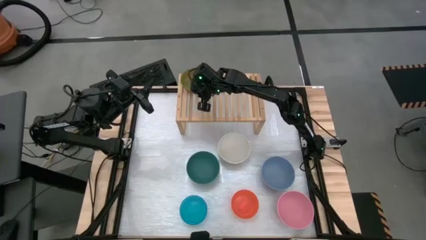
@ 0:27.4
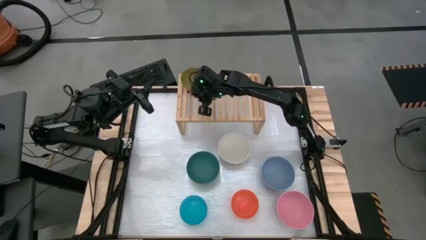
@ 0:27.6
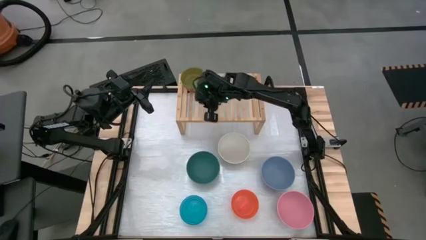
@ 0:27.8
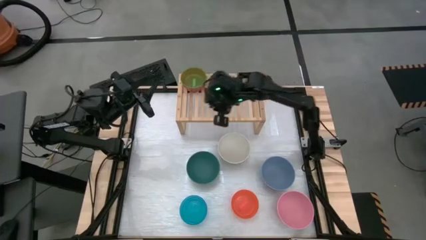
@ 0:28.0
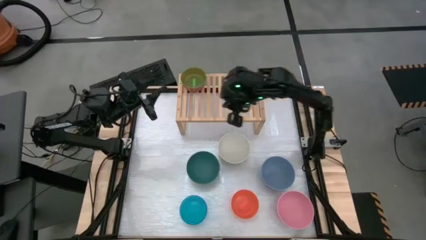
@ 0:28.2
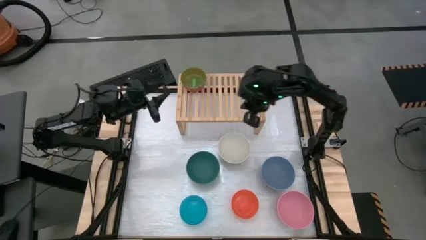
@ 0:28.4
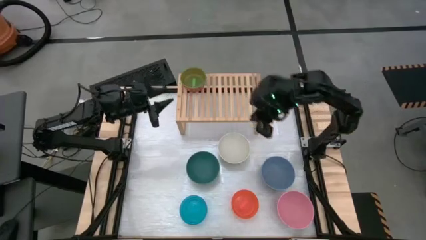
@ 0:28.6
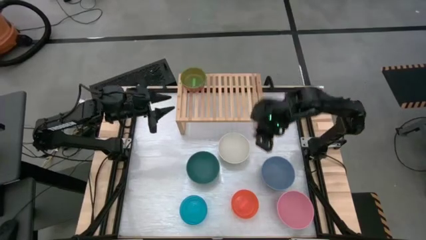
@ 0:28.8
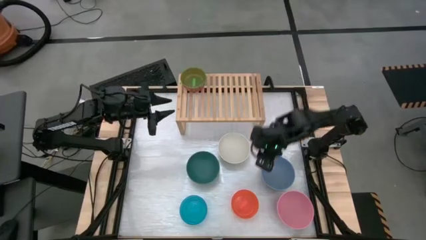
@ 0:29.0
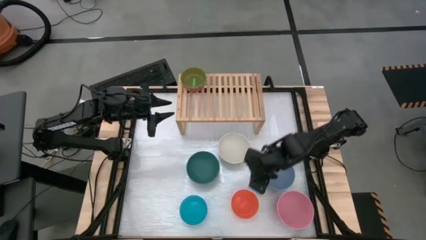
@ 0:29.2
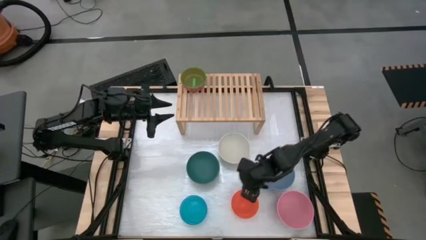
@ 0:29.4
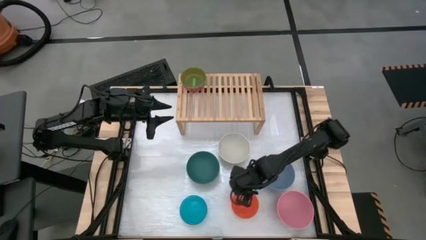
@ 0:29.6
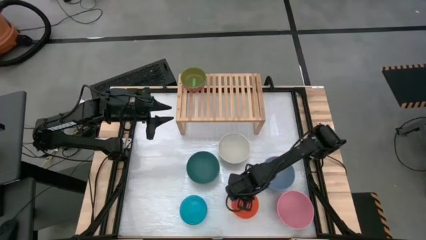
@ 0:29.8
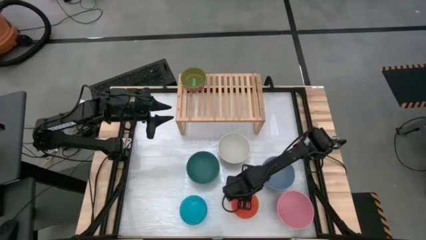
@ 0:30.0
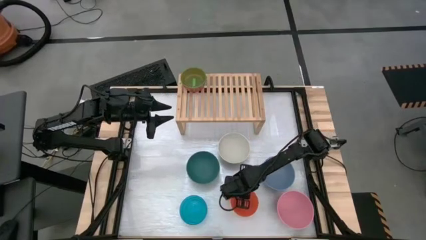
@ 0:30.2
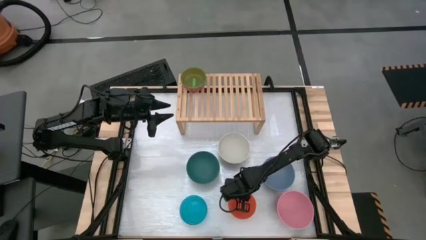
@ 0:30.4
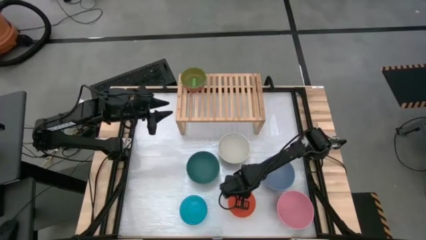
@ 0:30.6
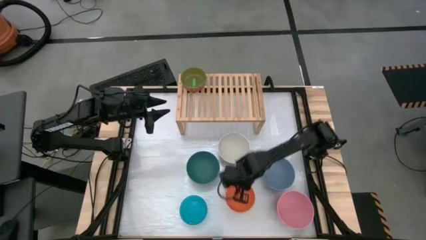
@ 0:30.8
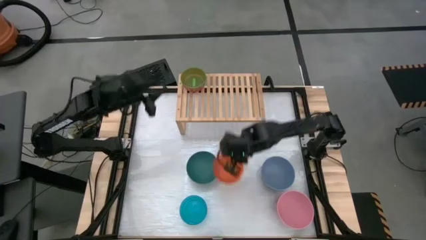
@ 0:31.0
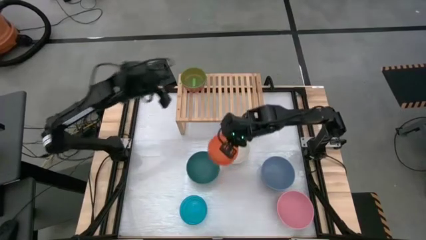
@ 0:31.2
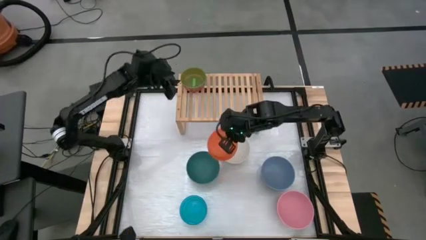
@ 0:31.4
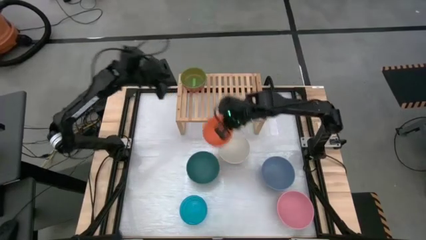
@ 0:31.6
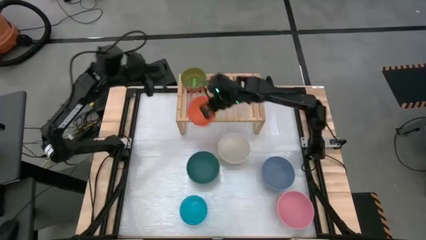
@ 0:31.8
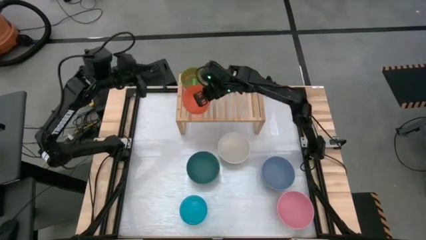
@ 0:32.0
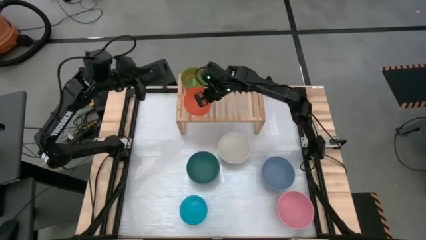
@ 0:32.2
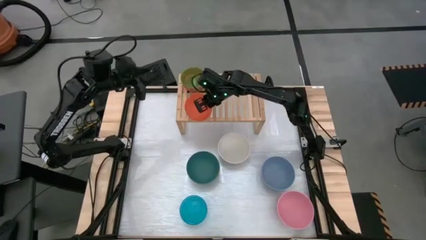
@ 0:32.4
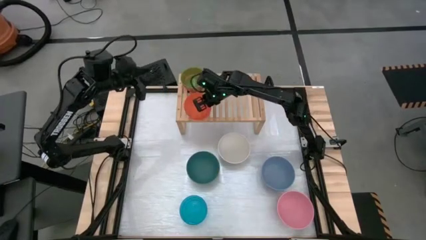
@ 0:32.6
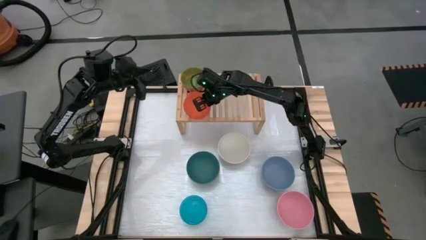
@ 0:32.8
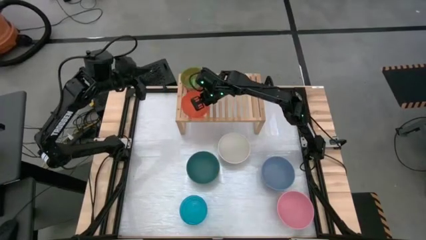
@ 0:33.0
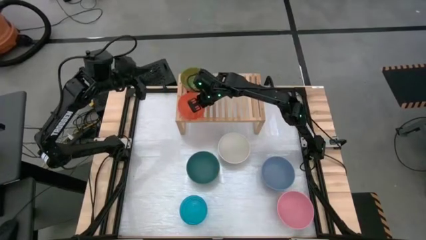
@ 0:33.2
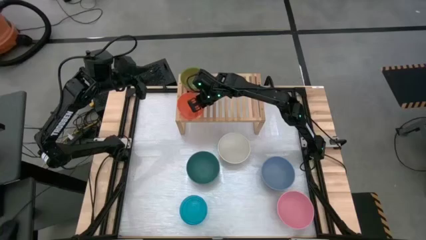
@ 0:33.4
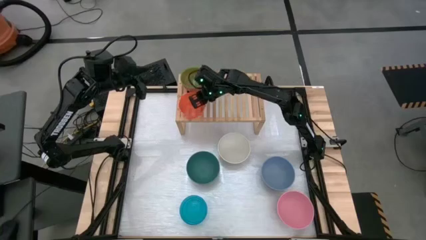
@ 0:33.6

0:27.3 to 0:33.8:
Task: Place and stack bowls onto a shelf
Put the transparent orange bowl on the shelf

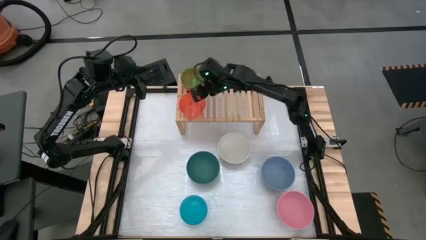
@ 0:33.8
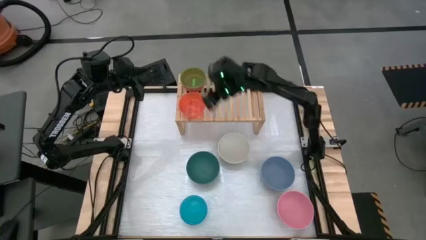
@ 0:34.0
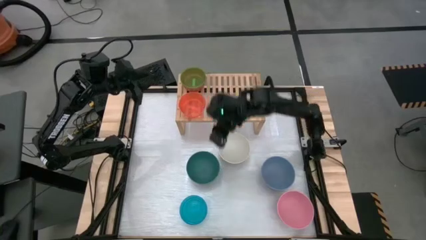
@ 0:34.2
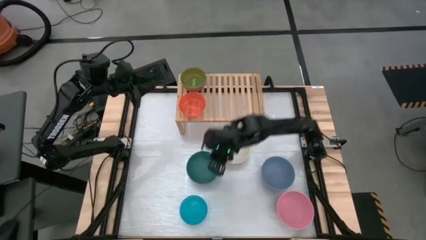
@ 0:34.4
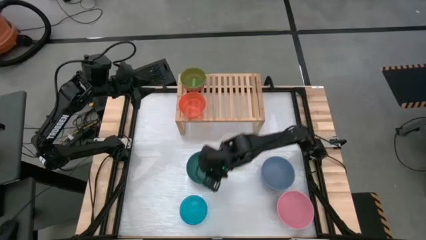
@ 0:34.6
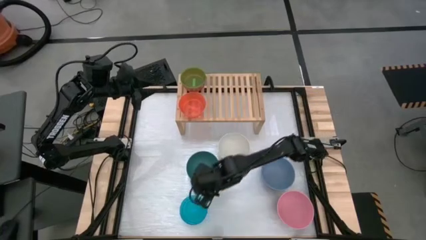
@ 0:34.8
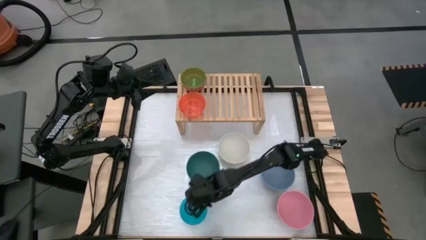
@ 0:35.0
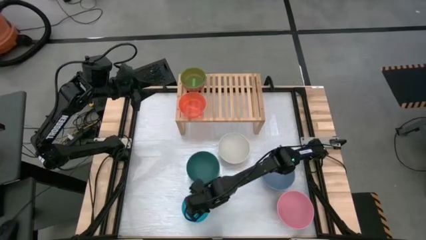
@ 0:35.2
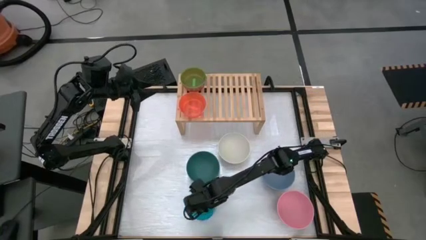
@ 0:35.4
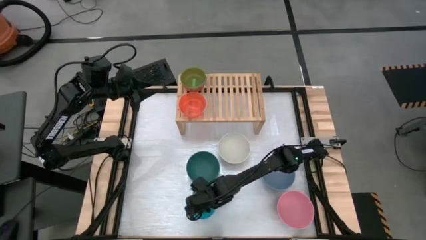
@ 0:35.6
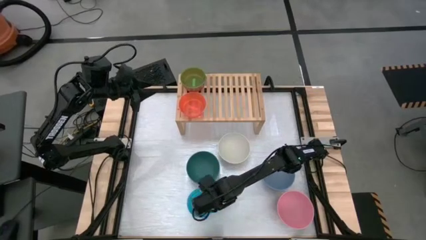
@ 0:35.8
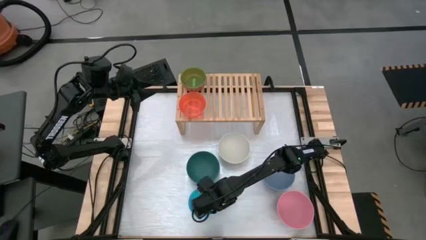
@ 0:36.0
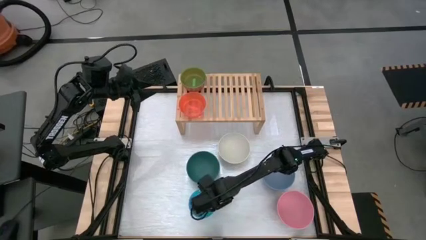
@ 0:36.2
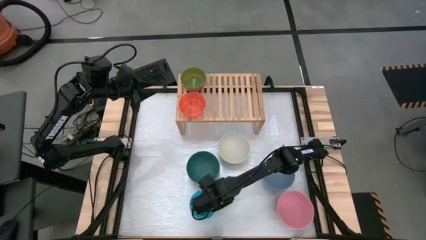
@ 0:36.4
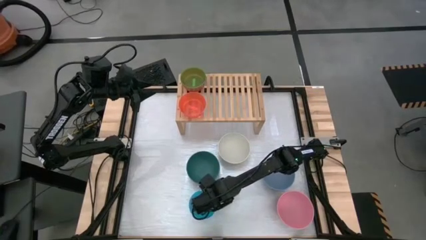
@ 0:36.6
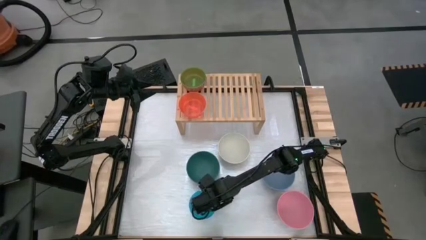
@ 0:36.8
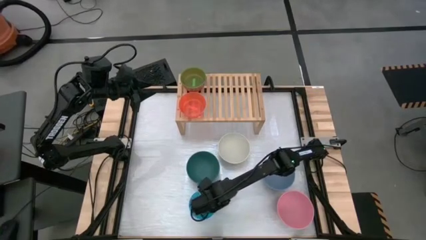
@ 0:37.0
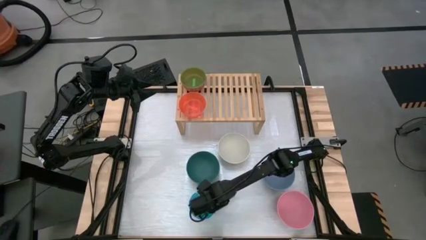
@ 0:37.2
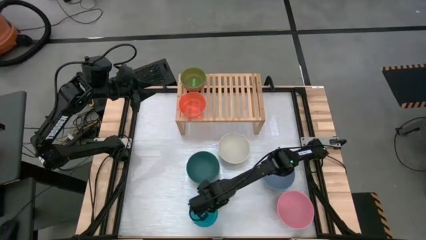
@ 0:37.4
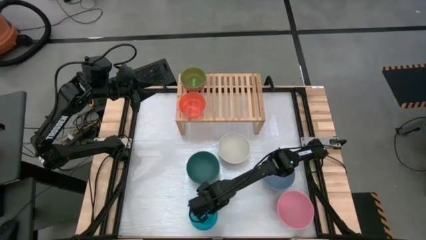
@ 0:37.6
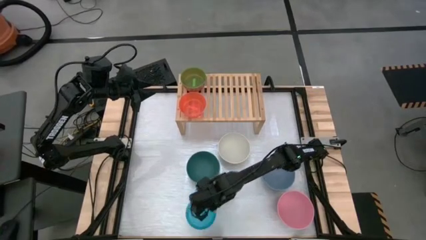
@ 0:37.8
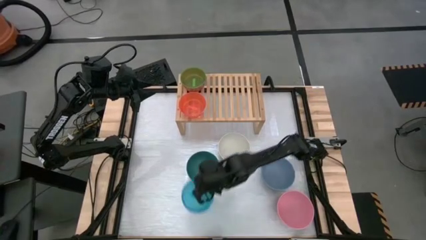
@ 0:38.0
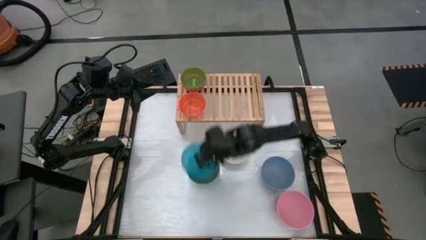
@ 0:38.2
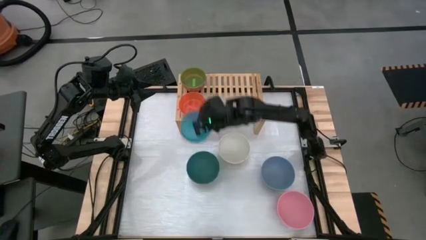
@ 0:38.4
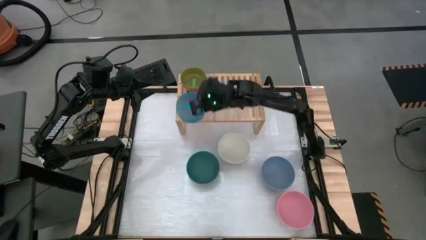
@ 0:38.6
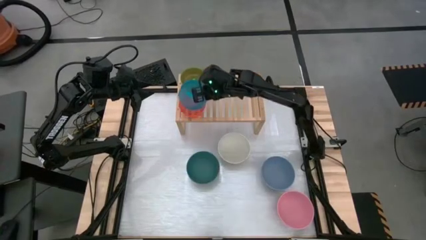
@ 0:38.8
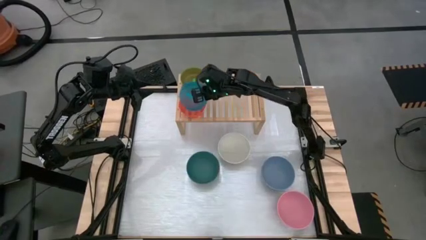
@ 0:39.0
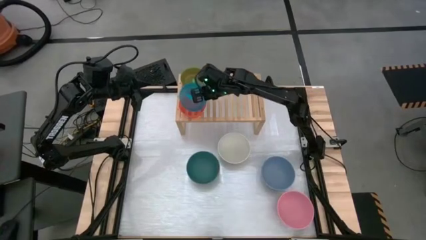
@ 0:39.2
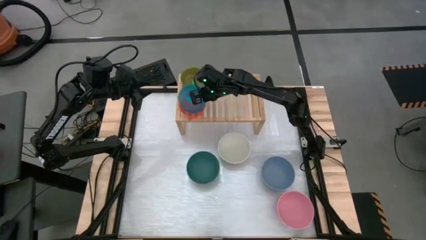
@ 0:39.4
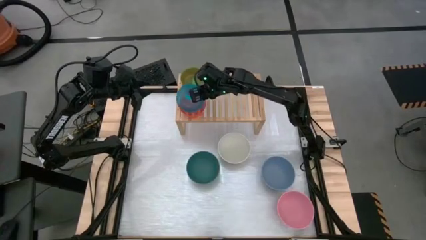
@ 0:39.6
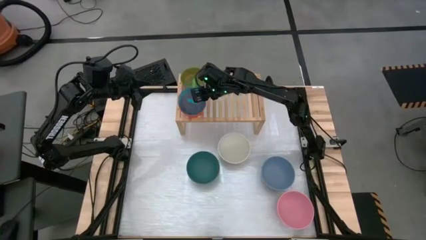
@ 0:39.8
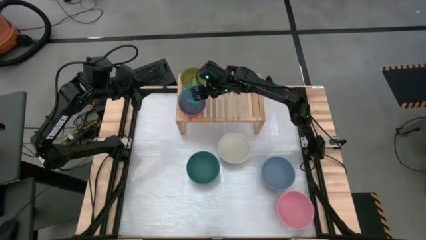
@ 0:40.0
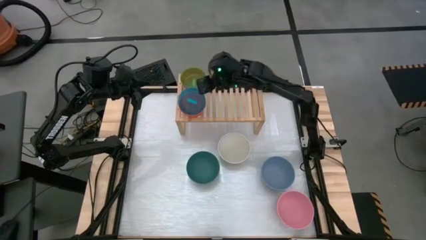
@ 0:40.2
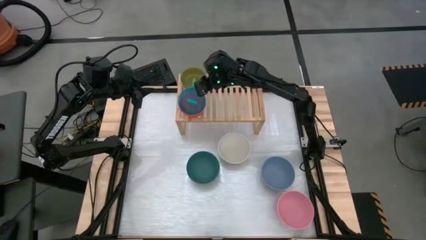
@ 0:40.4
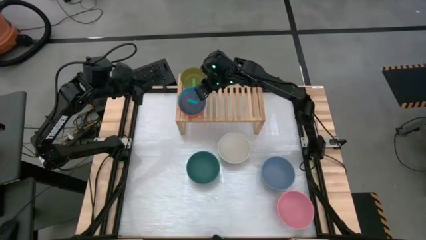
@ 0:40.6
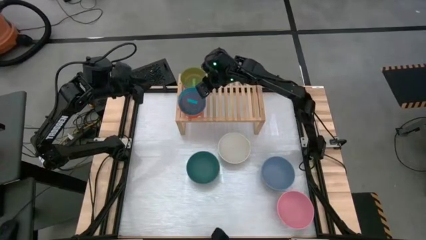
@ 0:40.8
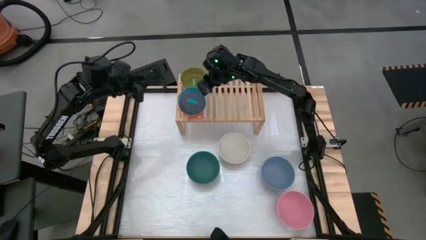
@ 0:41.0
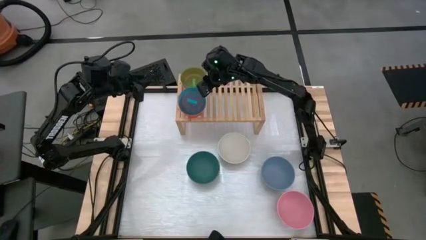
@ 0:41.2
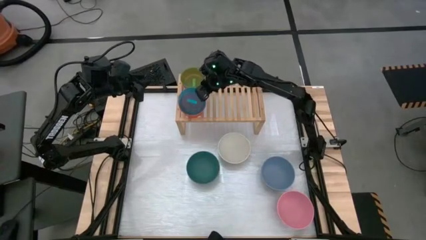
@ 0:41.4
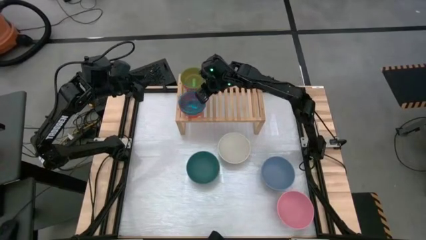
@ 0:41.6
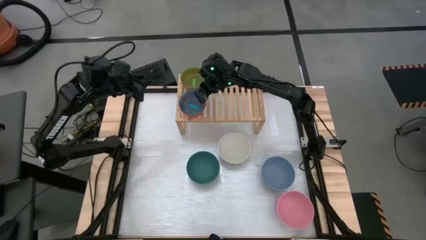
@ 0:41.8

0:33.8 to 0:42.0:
Stack the transparent blue bowl on top of the transparent orange bowl on the shelf

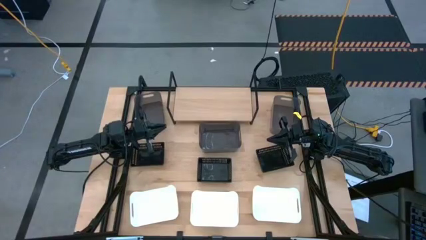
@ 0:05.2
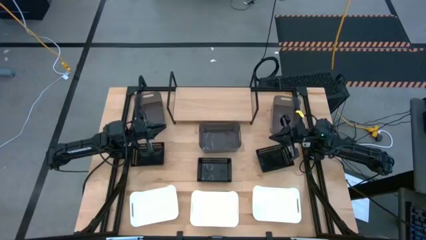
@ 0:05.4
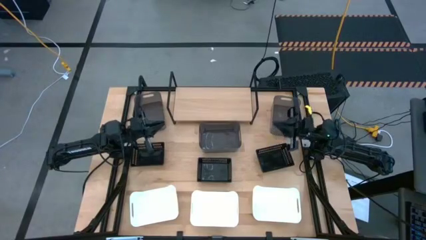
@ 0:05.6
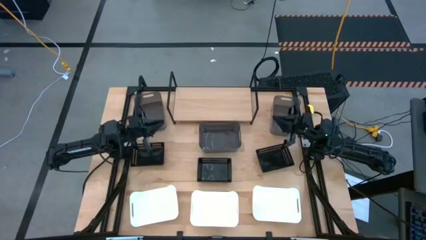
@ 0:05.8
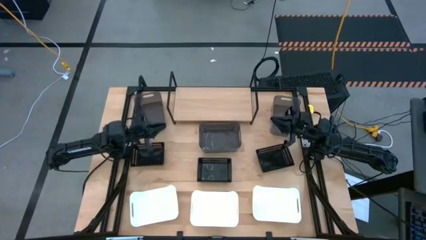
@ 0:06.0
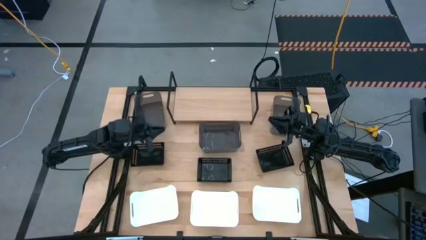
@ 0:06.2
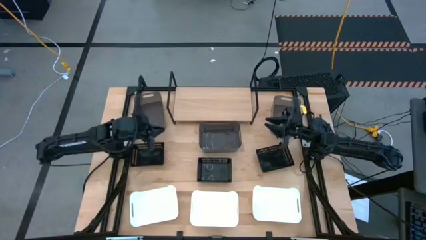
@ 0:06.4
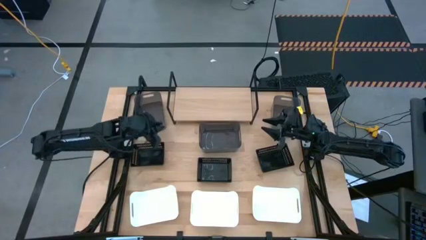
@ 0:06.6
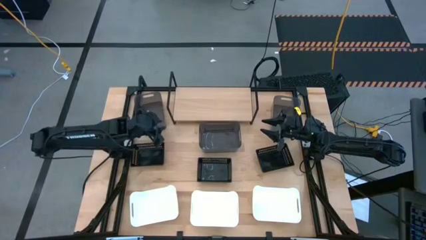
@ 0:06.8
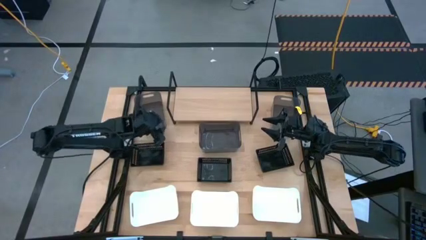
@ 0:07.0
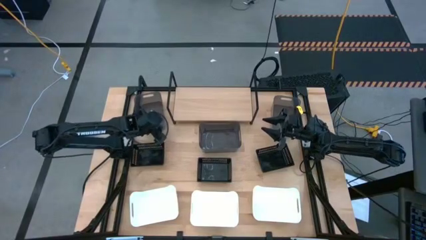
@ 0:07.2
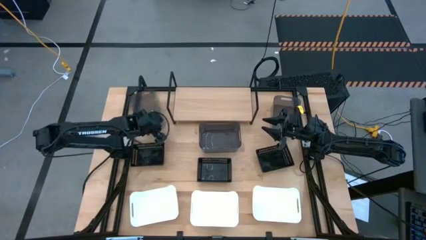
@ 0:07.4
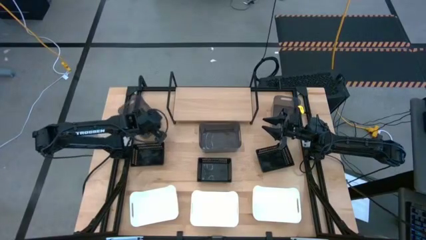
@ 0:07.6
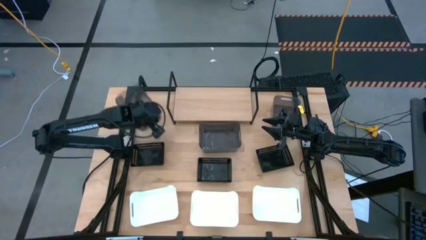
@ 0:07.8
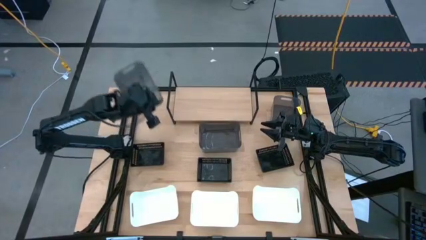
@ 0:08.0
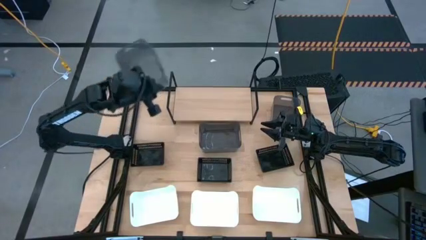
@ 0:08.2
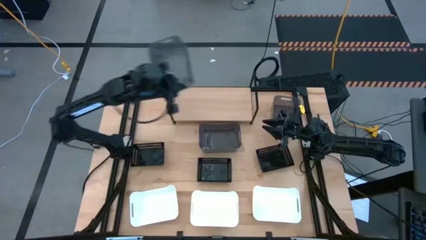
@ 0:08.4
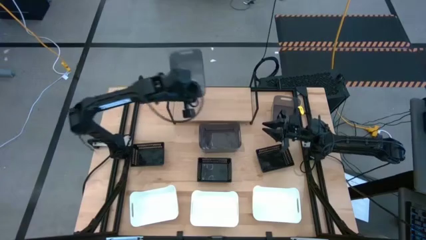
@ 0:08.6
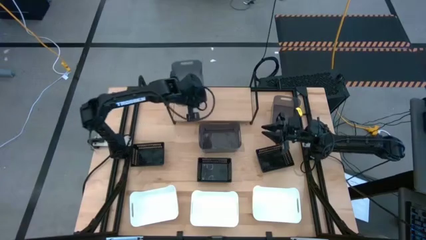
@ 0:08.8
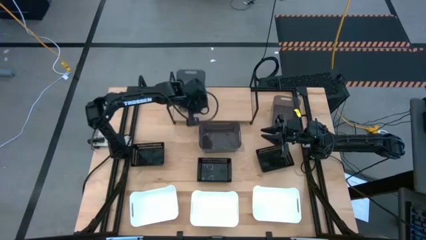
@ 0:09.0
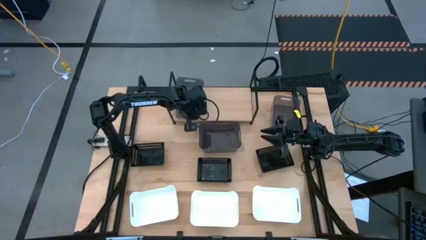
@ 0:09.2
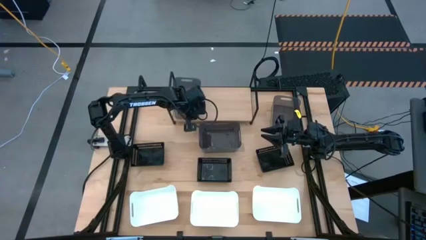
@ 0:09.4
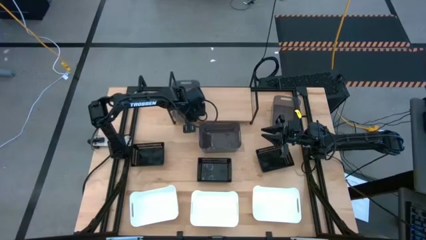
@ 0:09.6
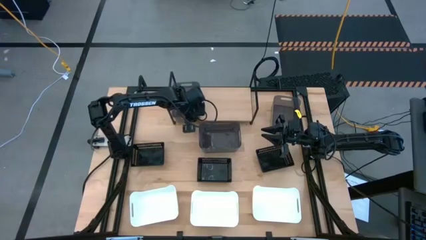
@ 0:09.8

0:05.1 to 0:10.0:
Task: Stack baskets on shelf by color
Put the top left gray bin on the shelf
